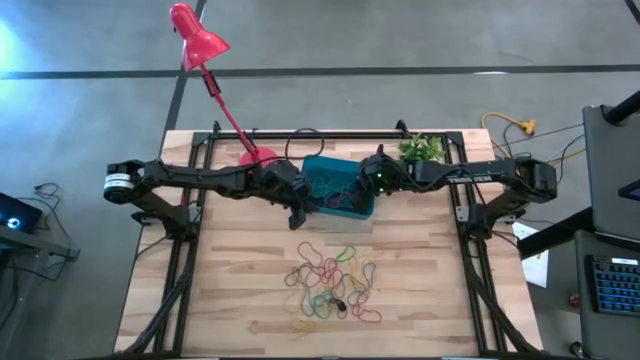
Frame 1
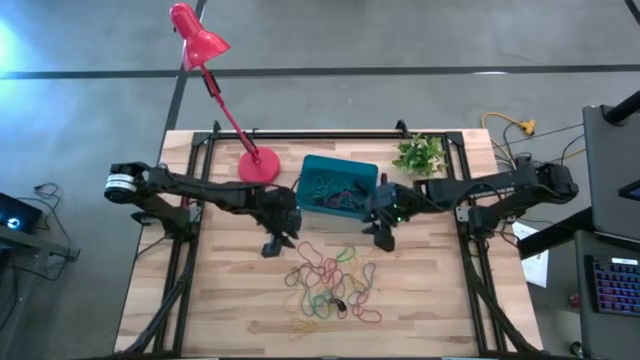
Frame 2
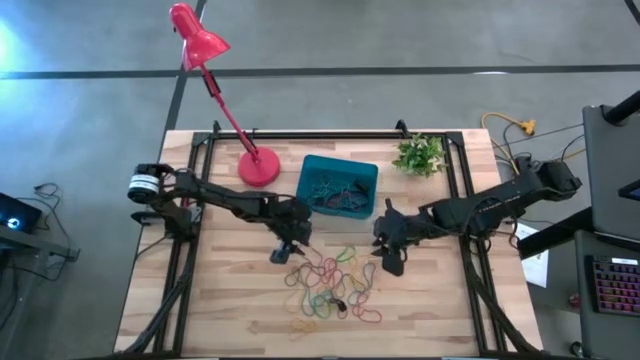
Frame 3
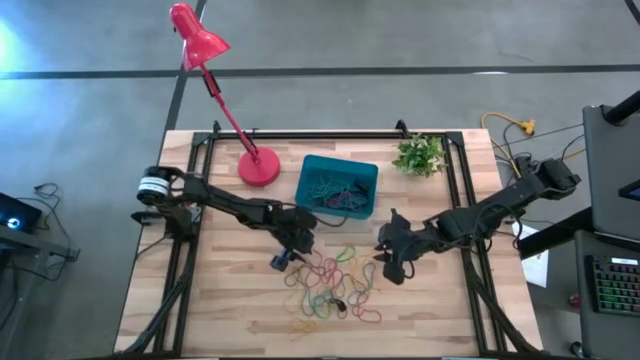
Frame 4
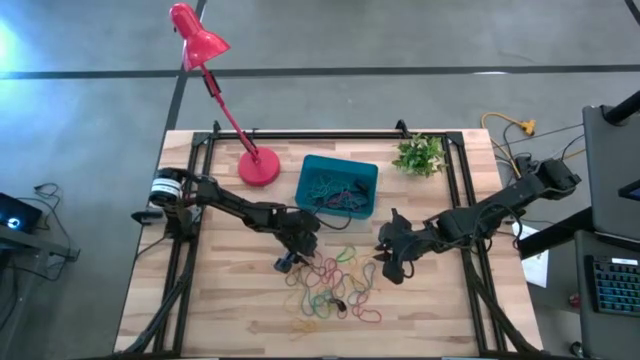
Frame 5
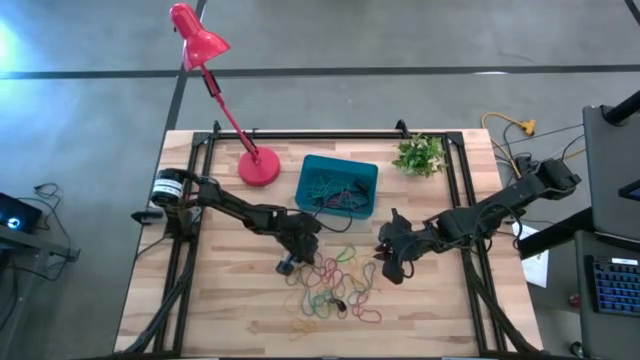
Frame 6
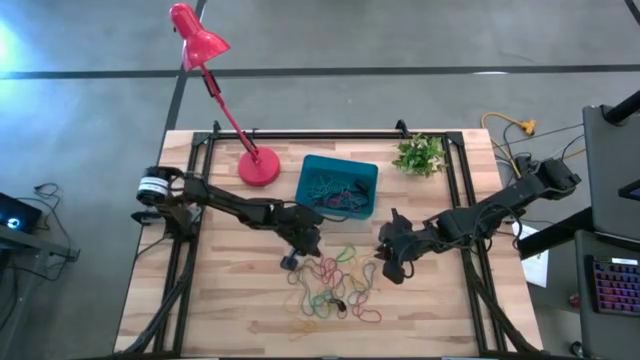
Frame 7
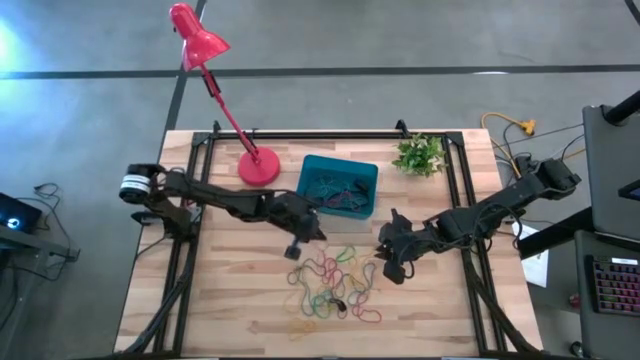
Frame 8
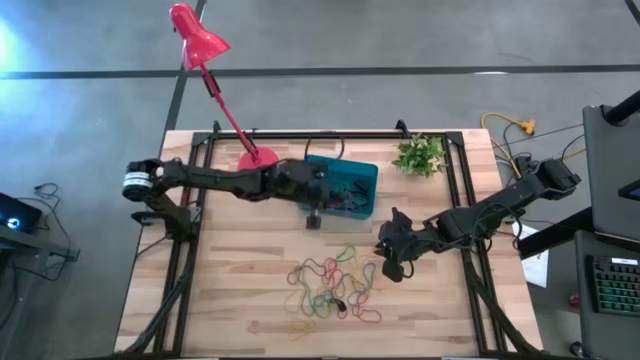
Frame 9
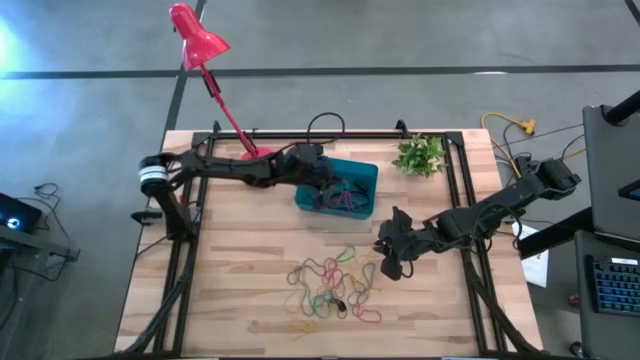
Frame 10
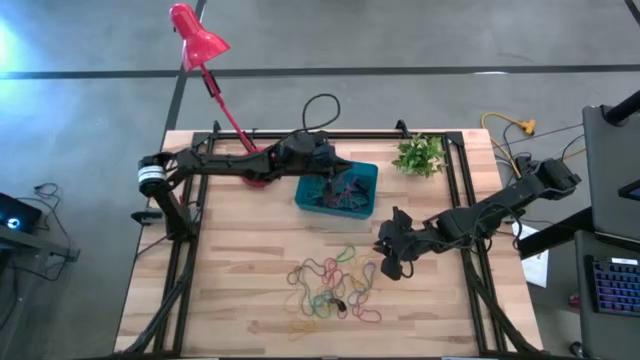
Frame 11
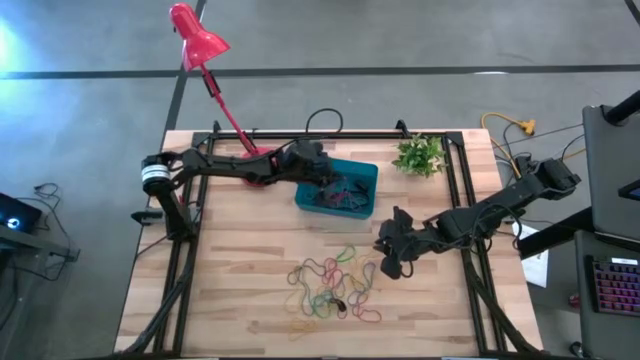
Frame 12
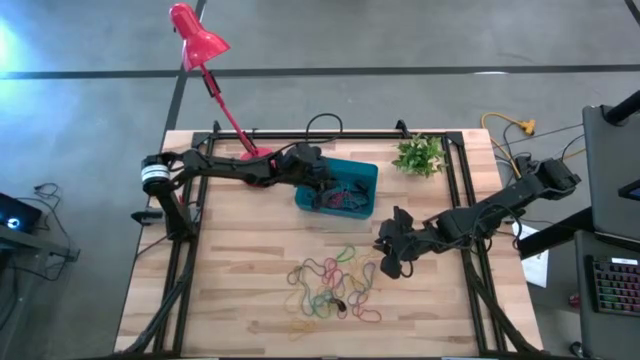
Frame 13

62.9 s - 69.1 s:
Task: Pick and place rubber bands into bin
Put the red rubber band into the blue bin

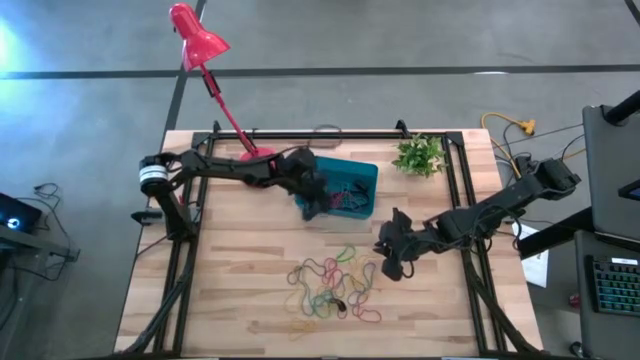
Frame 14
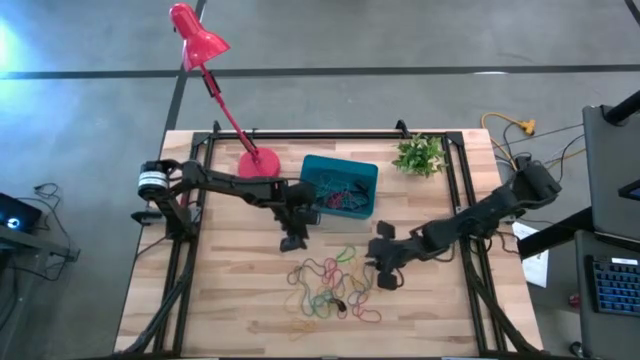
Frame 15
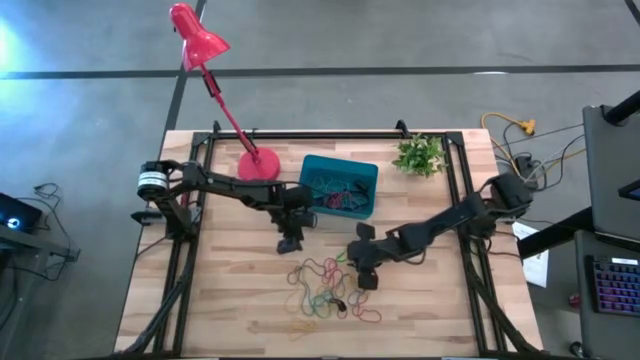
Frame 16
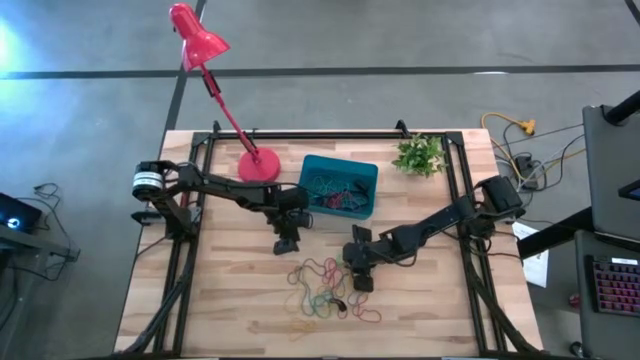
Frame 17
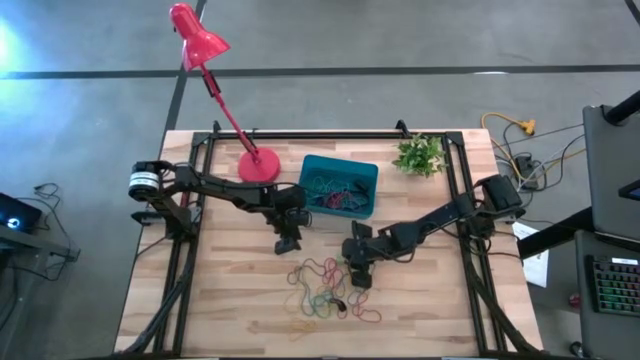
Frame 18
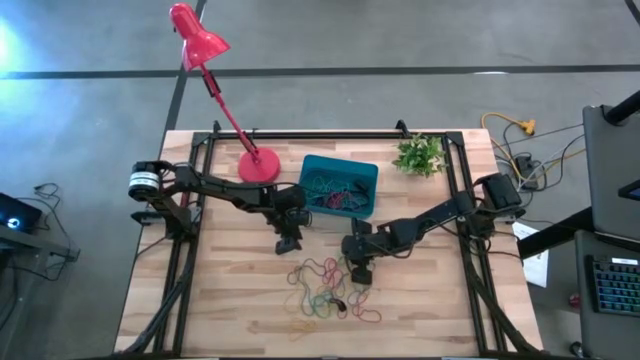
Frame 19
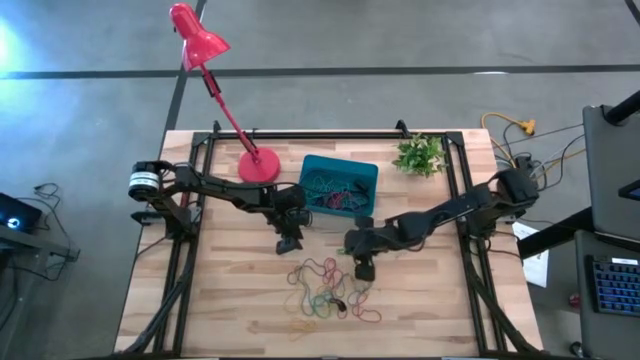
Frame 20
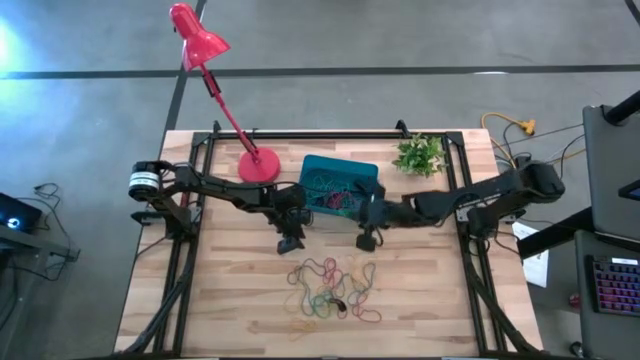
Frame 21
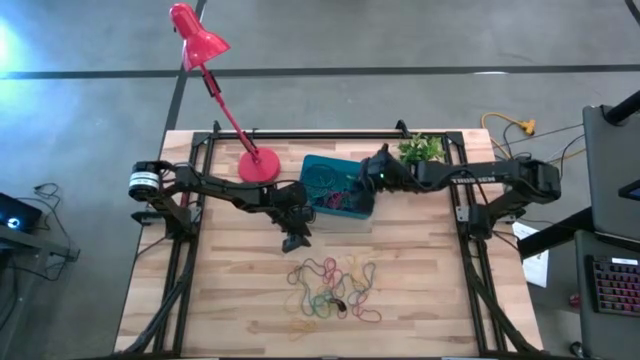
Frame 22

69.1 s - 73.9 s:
Put the green rubber band into the blue bin

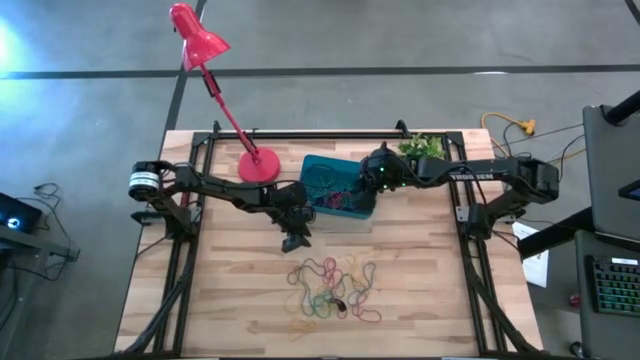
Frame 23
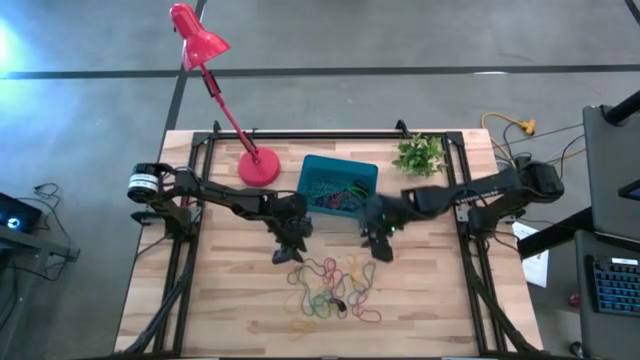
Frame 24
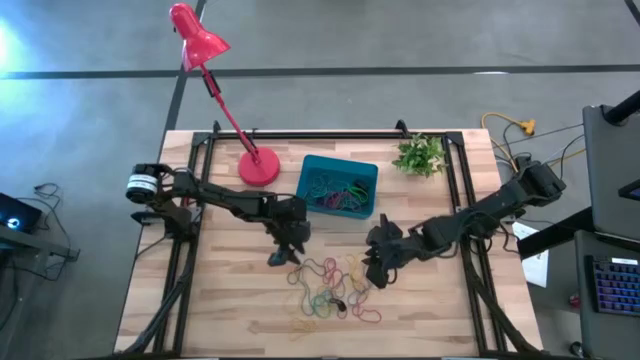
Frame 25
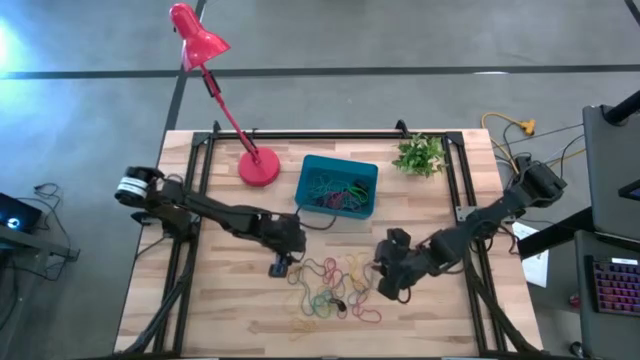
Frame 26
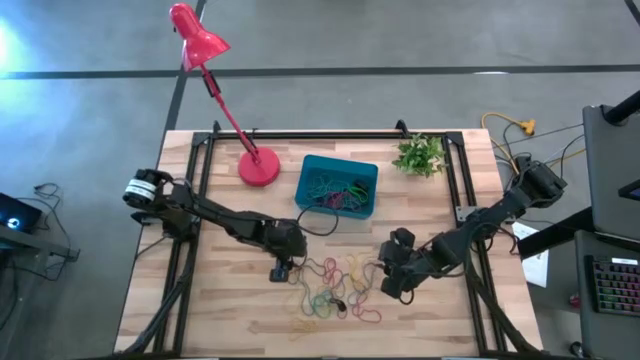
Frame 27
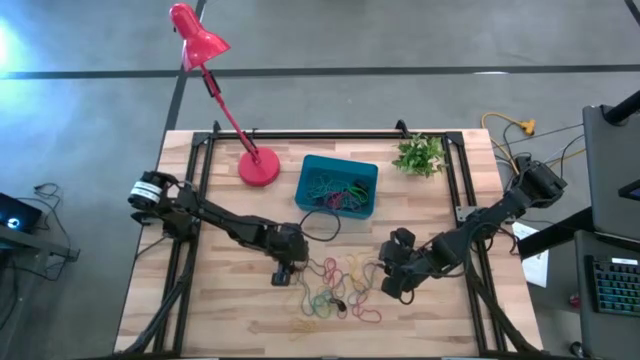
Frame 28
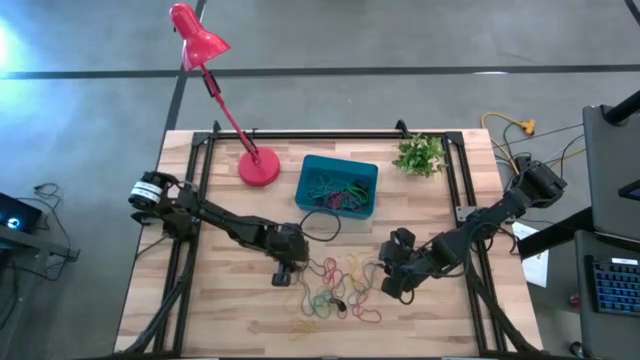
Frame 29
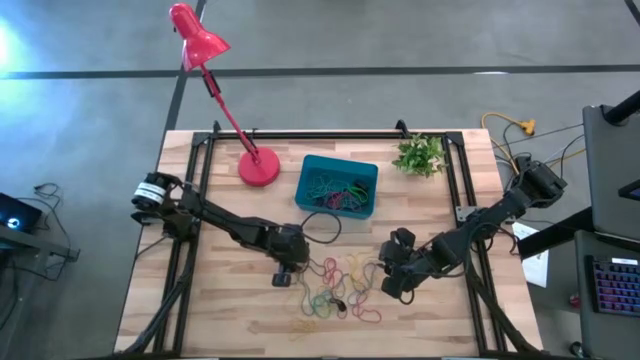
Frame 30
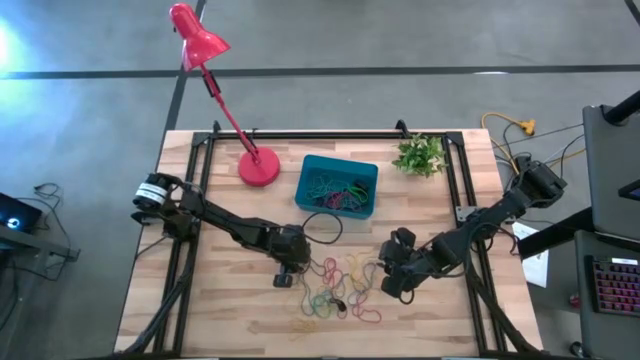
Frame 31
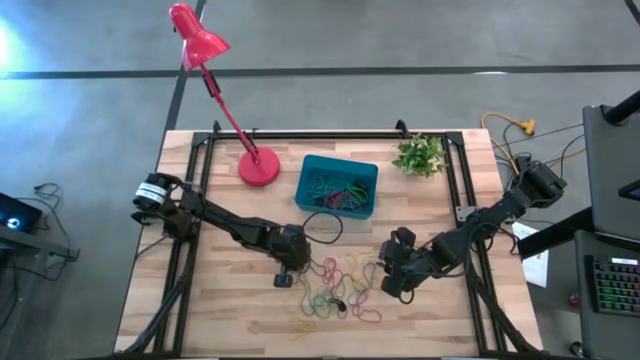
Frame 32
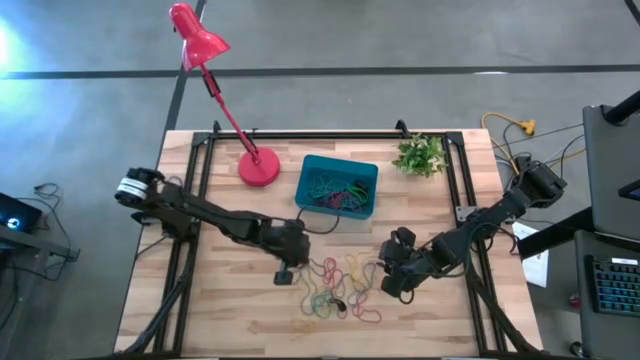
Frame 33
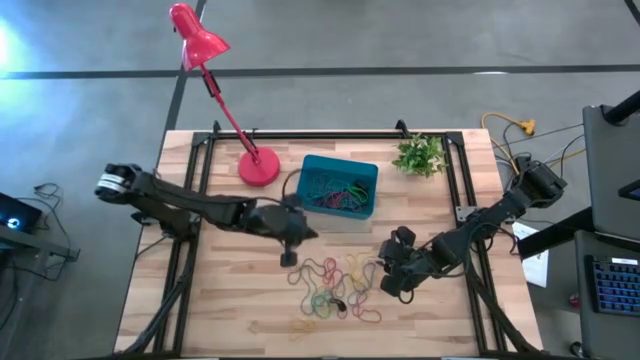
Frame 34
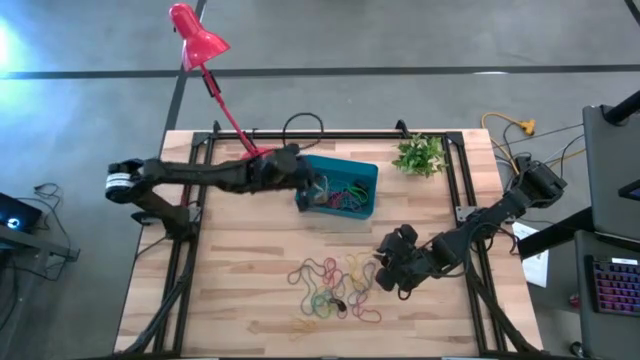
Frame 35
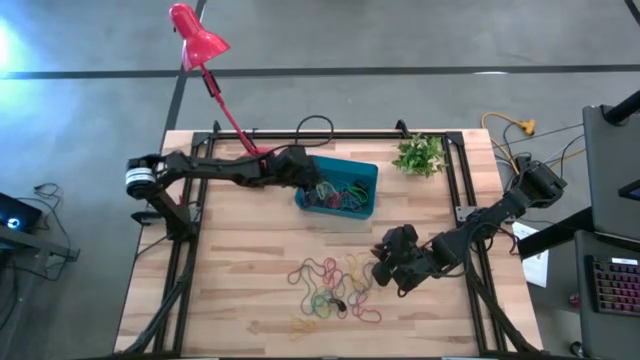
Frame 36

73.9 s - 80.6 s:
Put the yellow rubber band into the blue bin

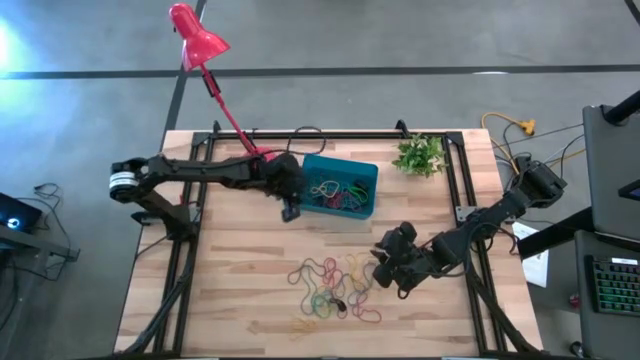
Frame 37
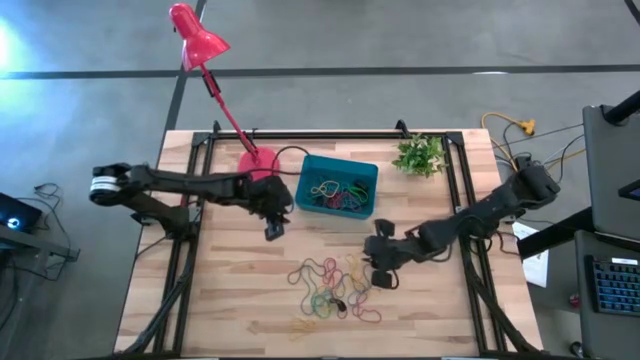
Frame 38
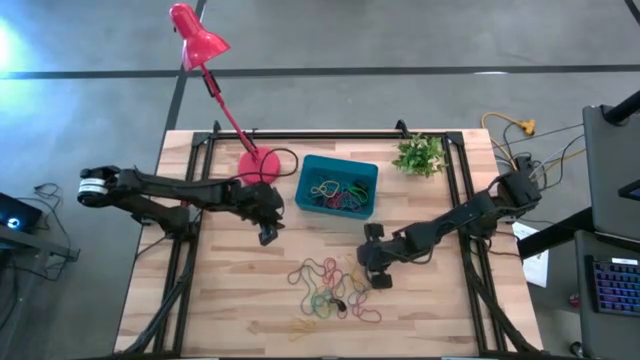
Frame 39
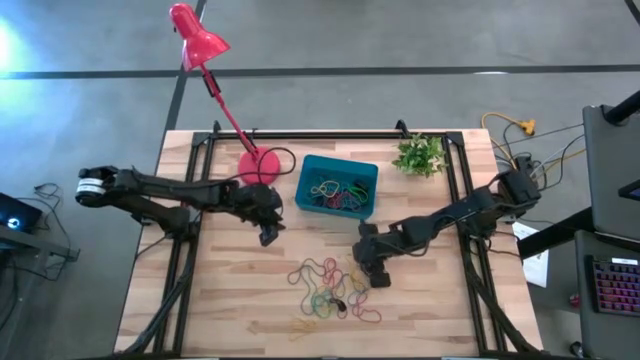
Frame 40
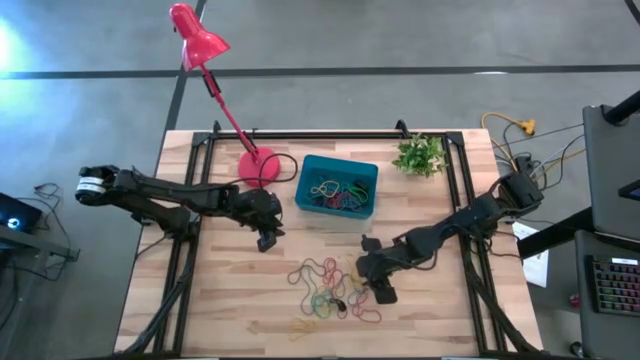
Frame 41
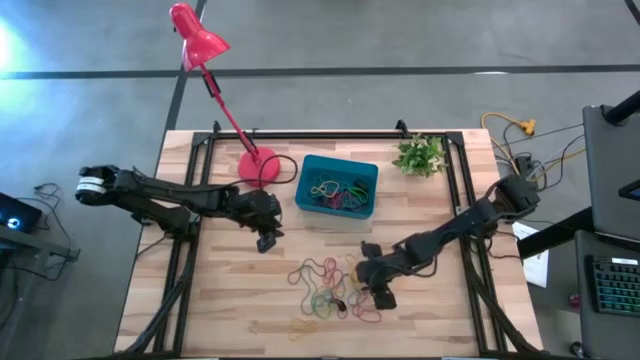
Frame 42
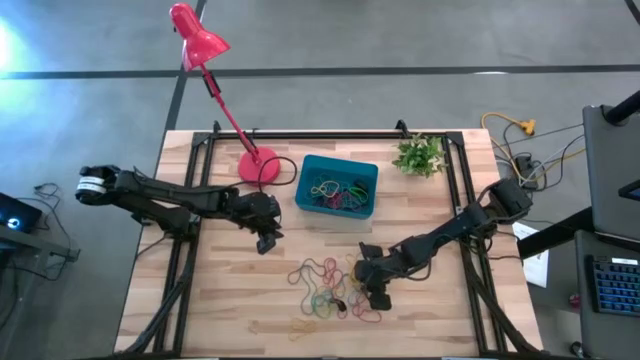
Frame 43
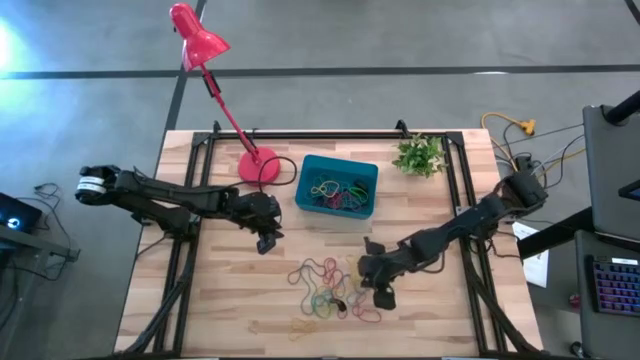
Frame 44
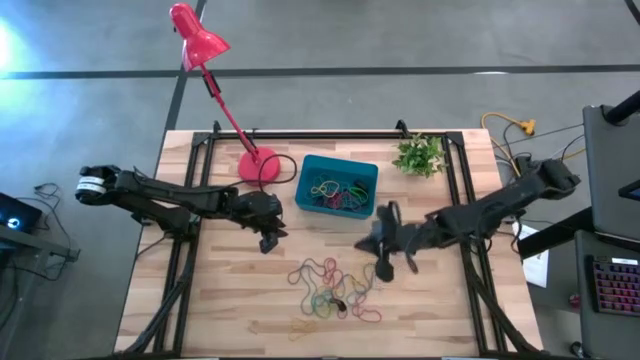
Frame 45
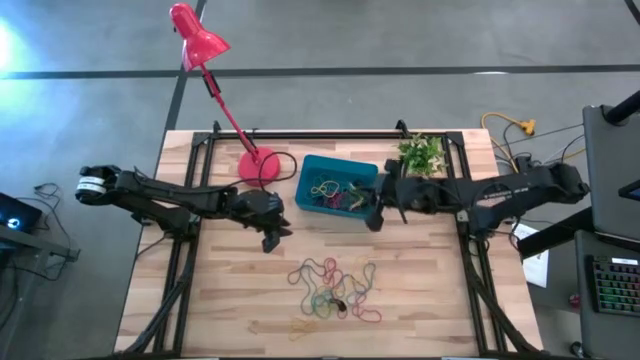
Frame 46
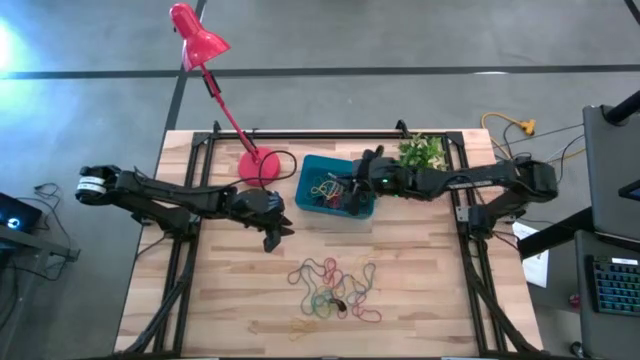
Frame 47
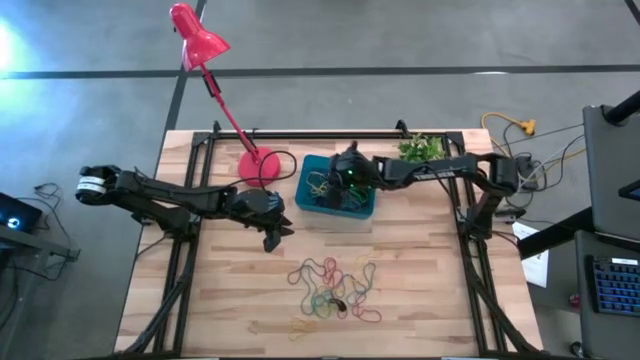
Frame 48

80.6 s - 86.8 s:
Put the yellow rubber band into the blue bin
